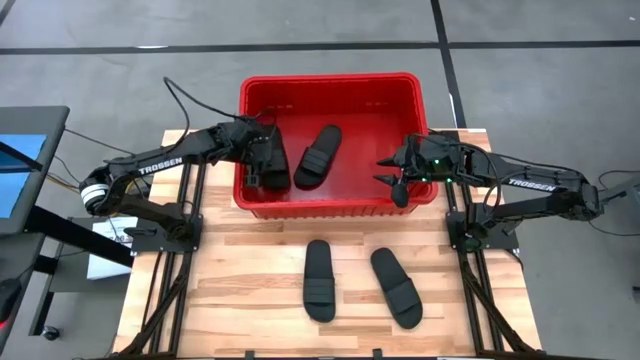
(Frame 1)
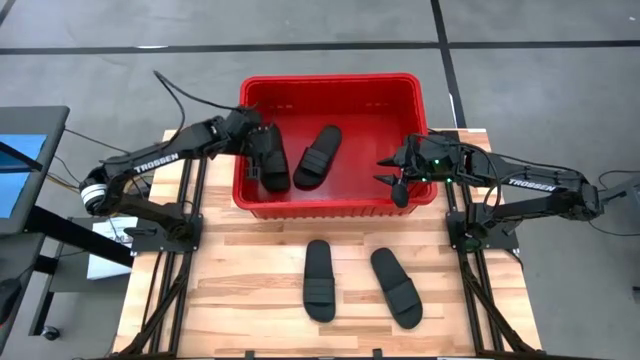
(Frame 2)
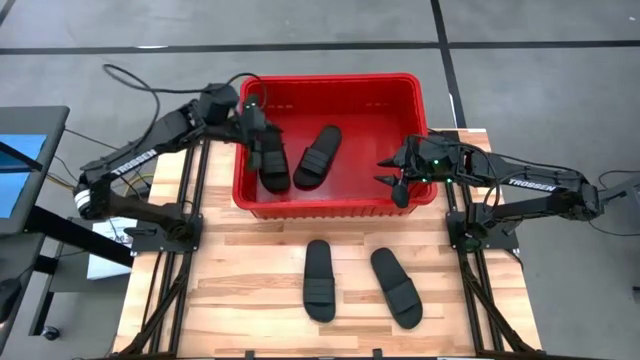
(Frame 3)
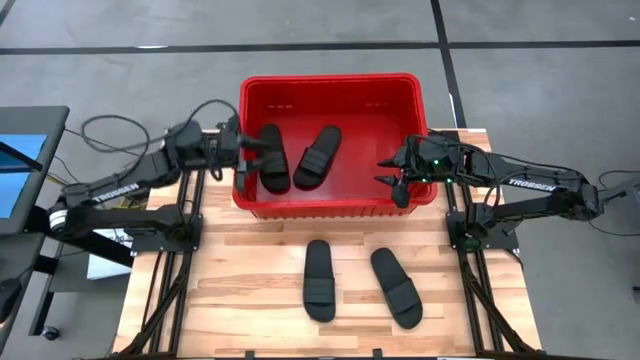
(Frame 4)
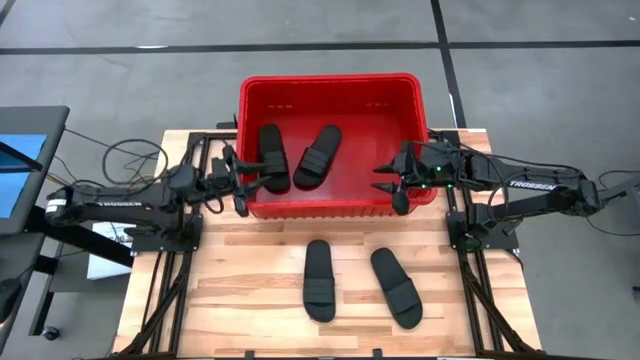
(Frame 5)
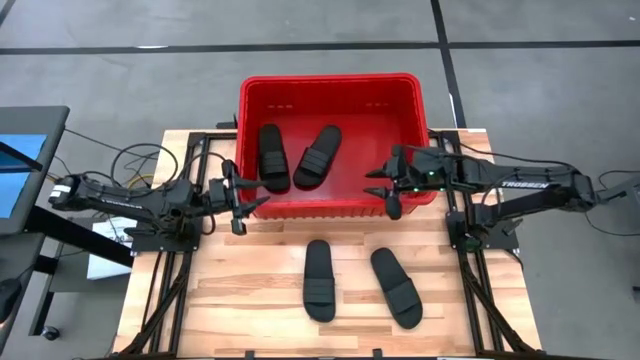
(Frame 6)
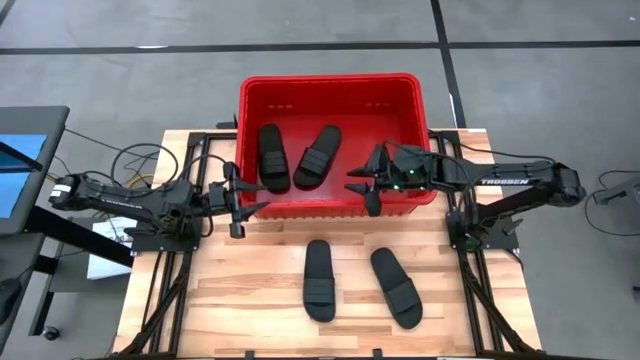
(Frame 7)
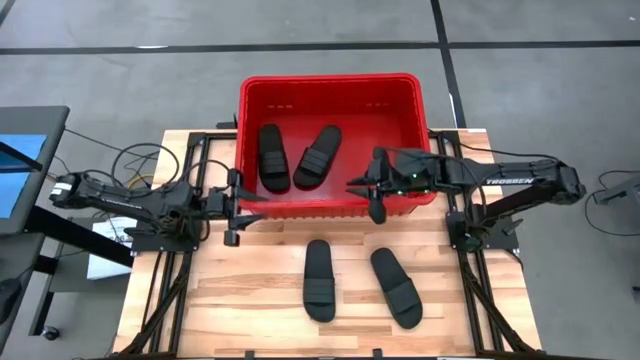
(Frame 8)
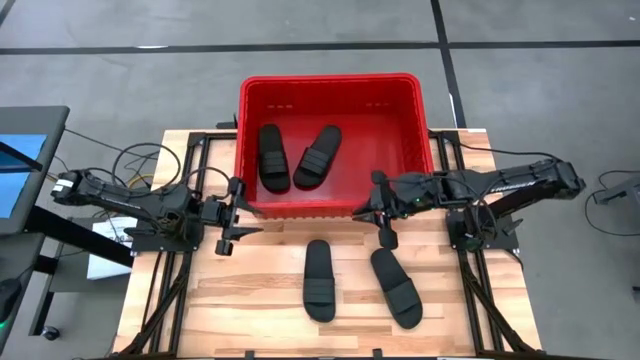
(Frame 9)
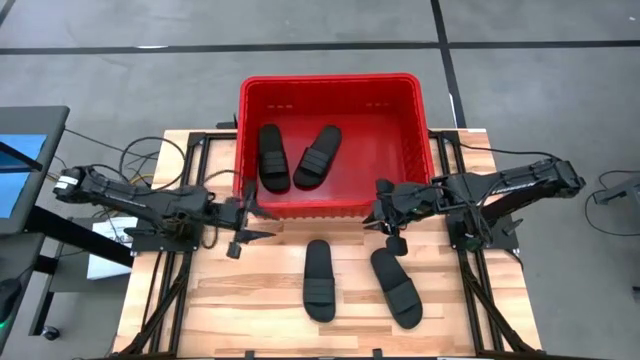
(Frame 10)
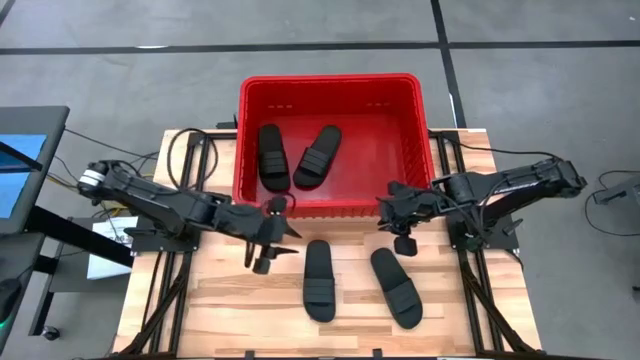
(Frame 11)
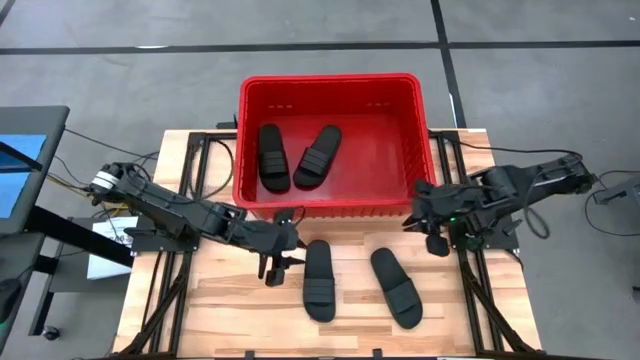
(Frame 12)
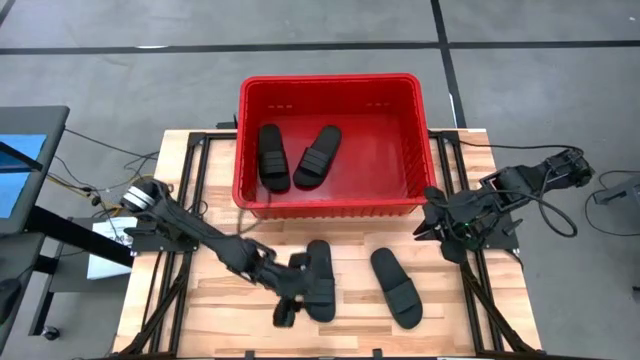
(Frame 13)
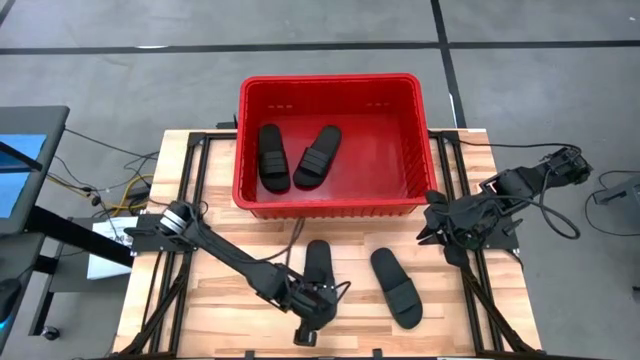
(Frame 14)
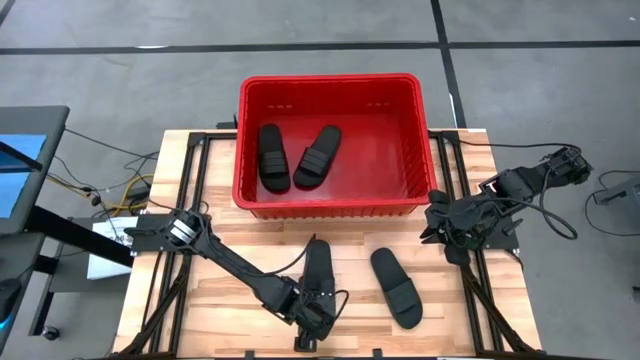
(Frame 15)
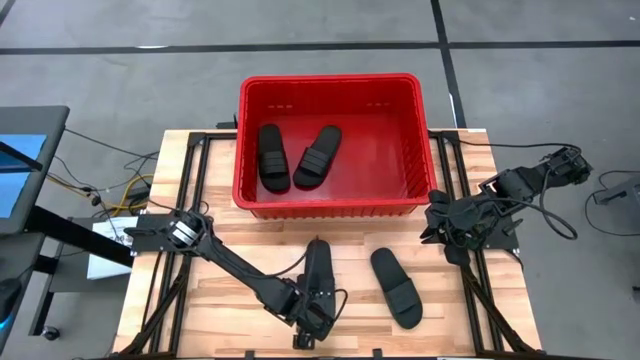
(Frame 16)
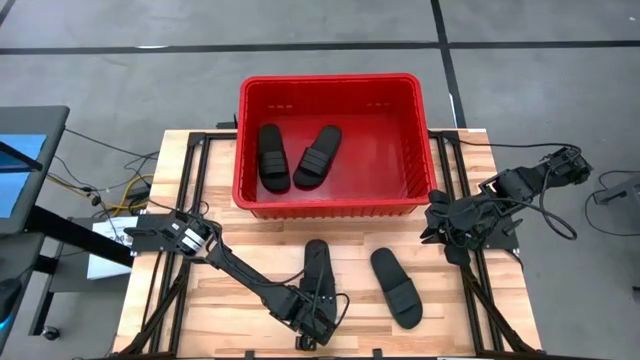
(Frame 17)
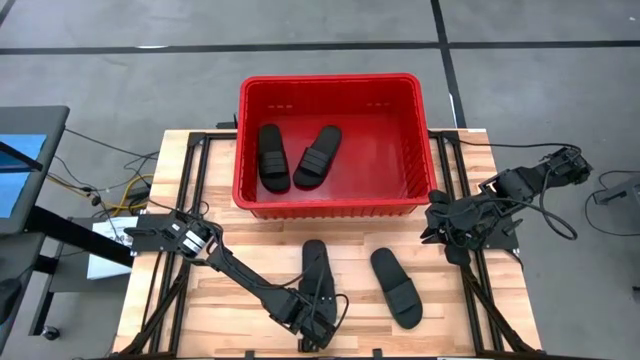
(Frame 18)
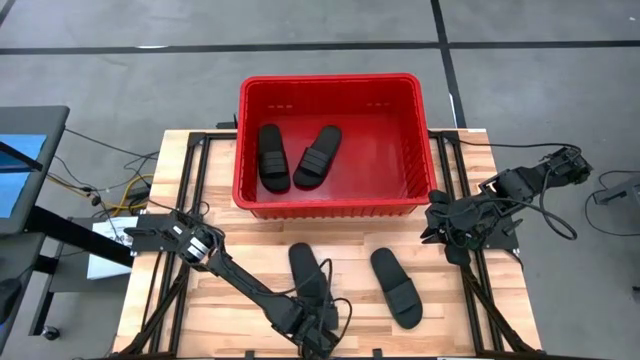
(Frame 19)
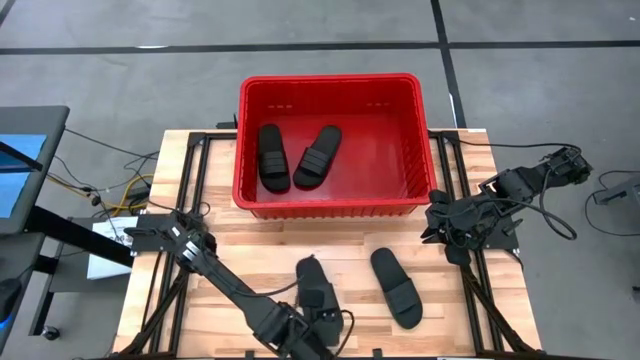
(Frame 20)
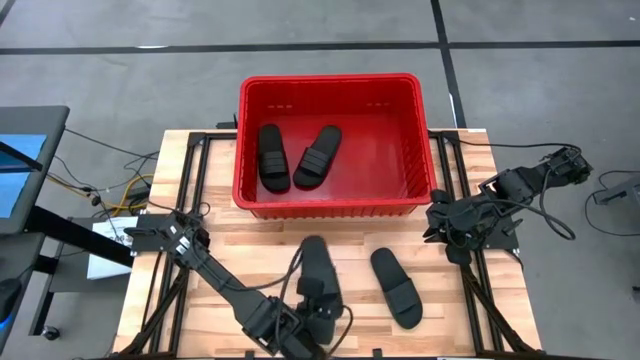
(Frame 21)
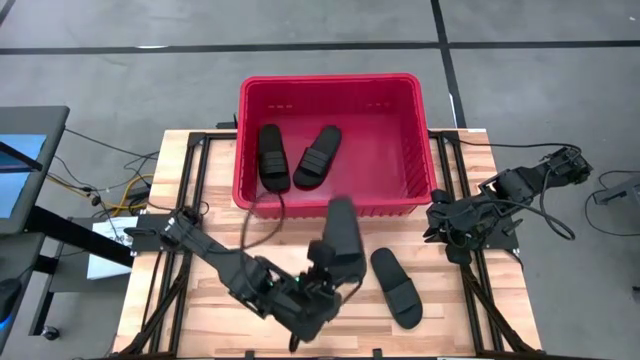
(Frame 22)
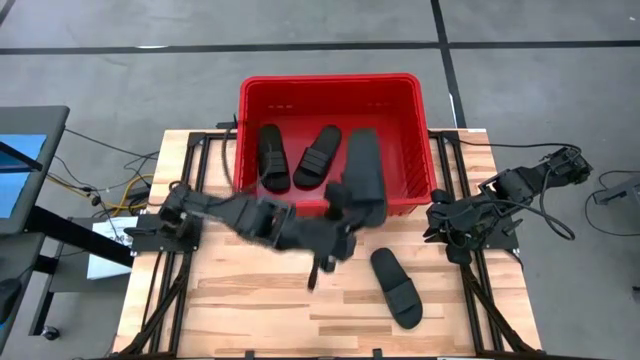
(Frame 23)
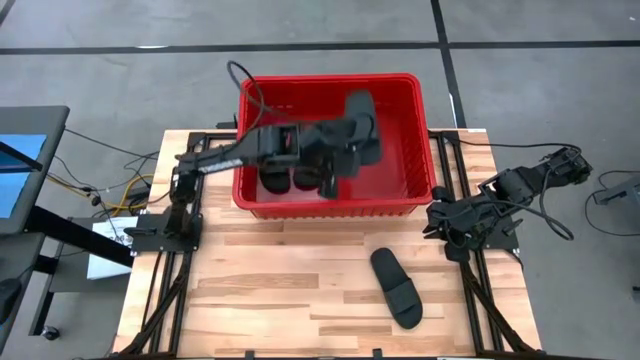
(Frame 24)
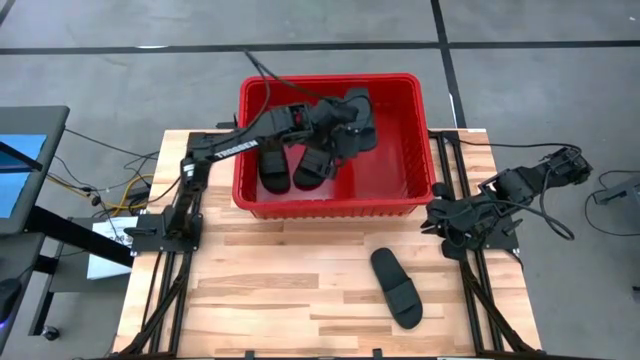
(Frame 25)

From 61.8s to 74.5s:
Task: Pick and place slides into bin
Put the black slipper into the red bin

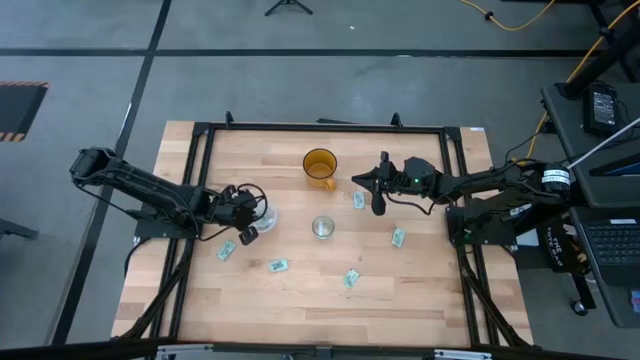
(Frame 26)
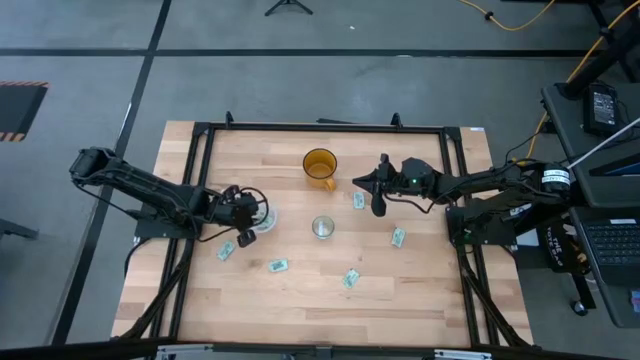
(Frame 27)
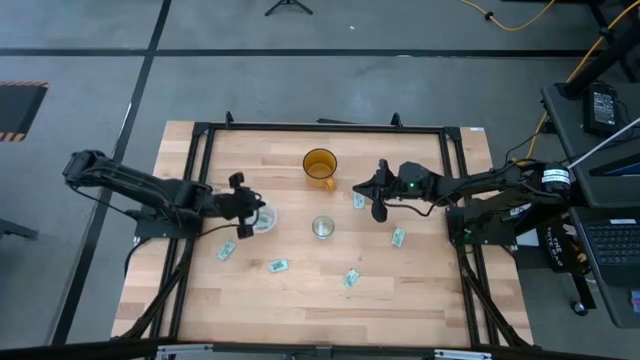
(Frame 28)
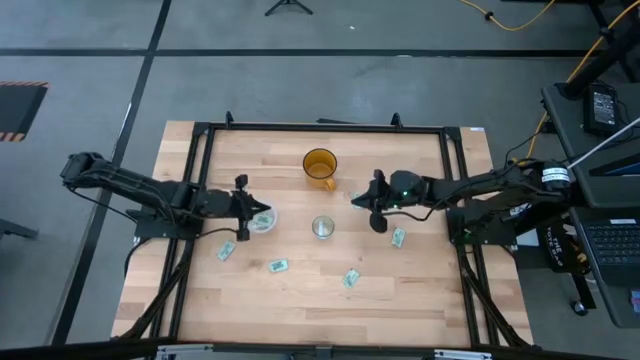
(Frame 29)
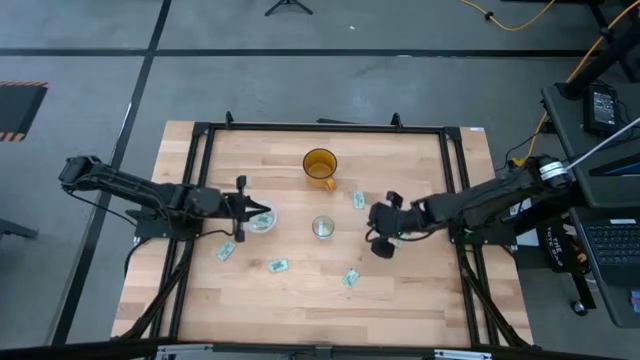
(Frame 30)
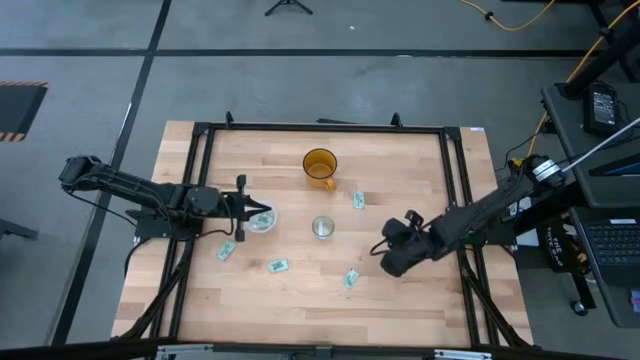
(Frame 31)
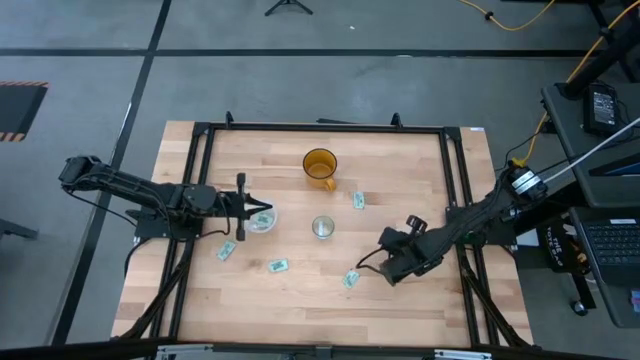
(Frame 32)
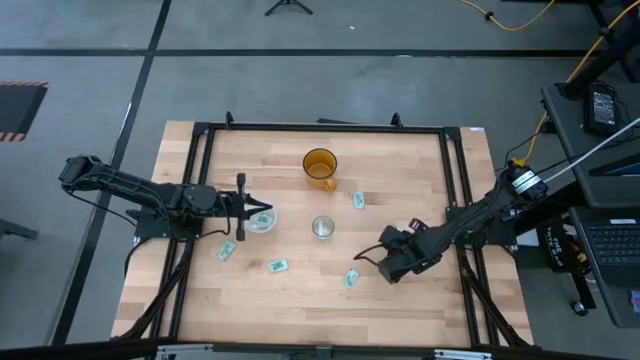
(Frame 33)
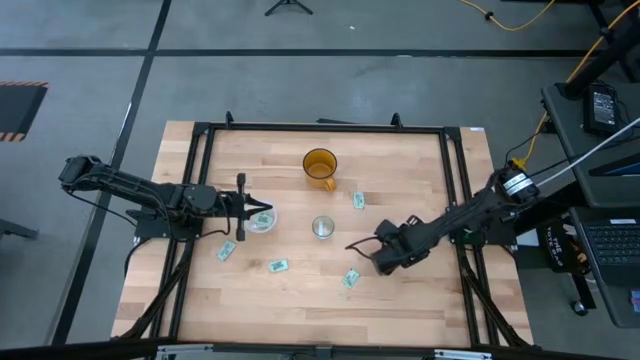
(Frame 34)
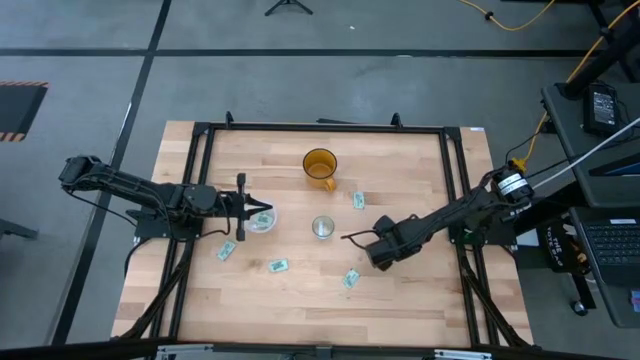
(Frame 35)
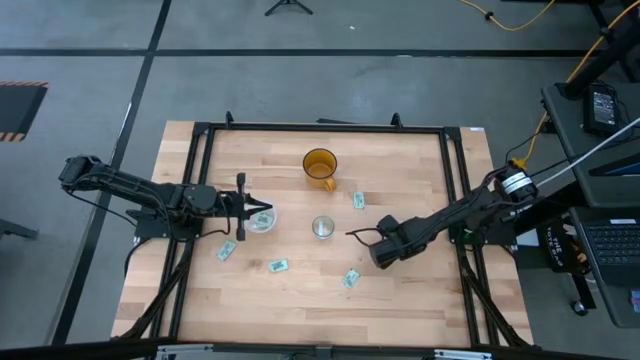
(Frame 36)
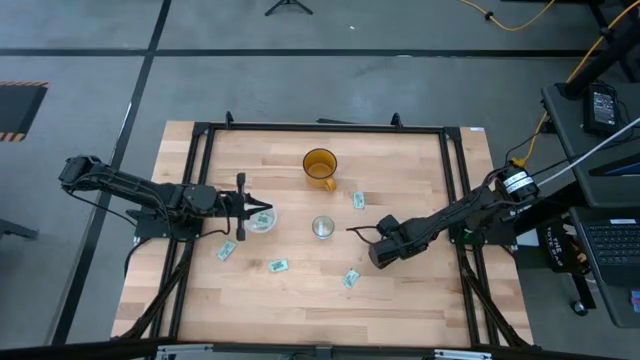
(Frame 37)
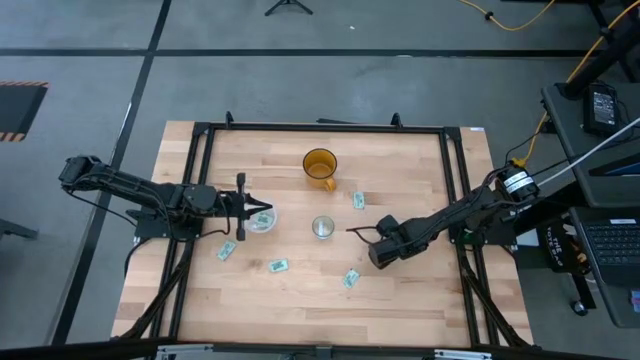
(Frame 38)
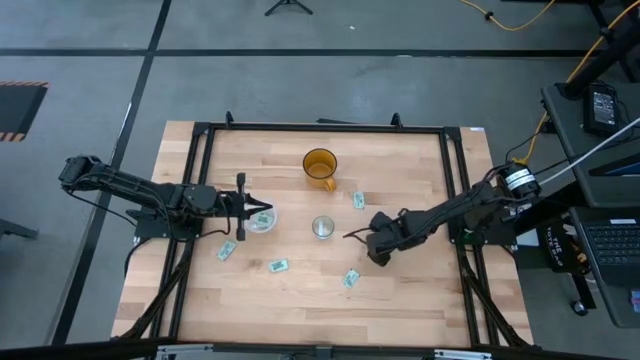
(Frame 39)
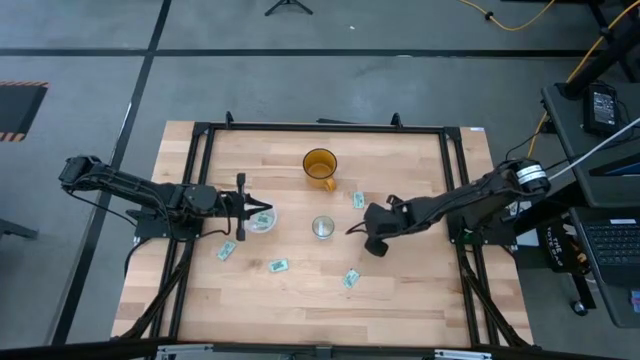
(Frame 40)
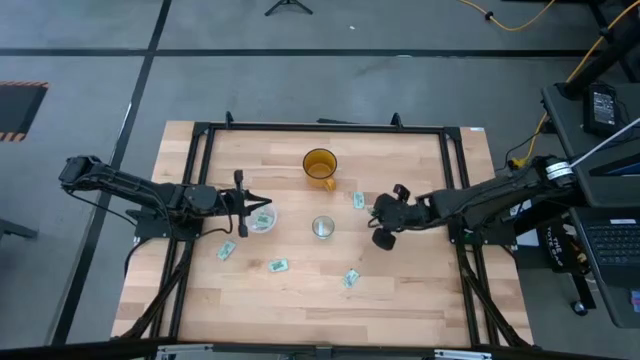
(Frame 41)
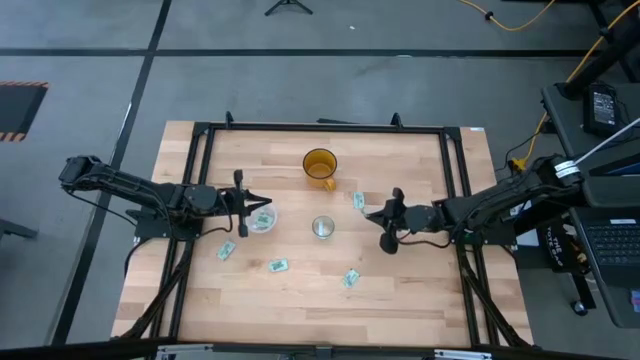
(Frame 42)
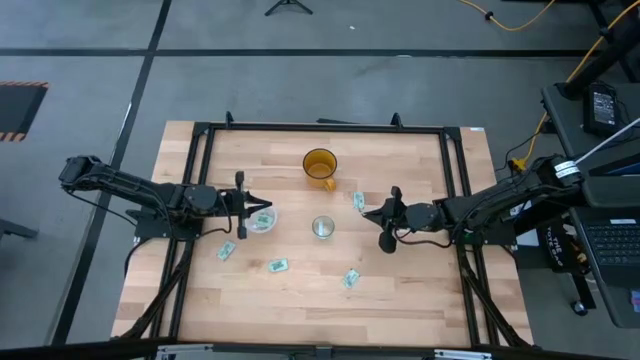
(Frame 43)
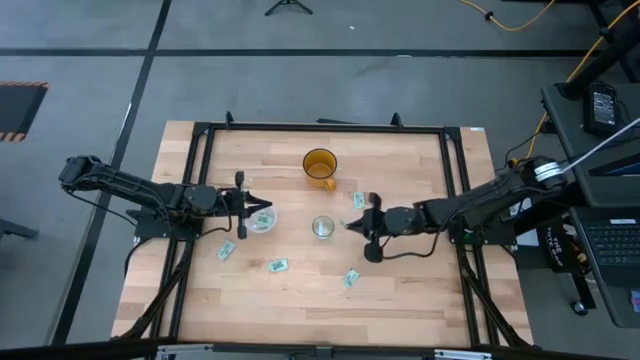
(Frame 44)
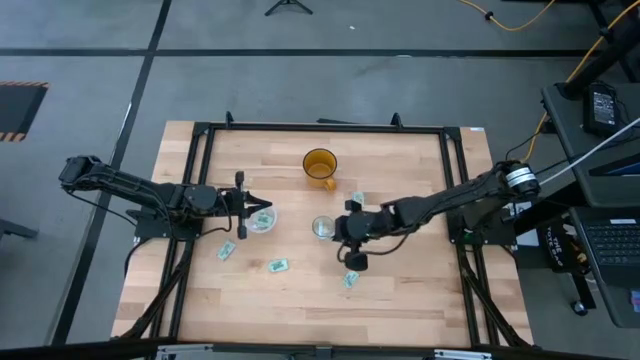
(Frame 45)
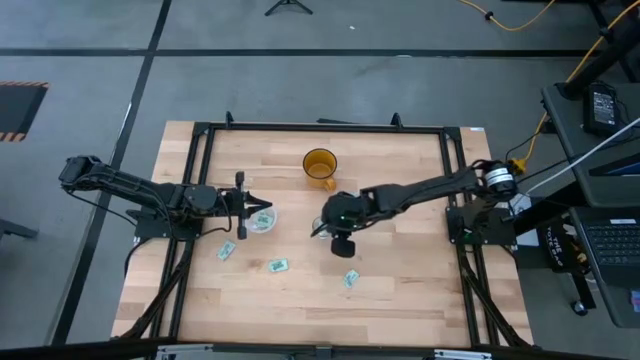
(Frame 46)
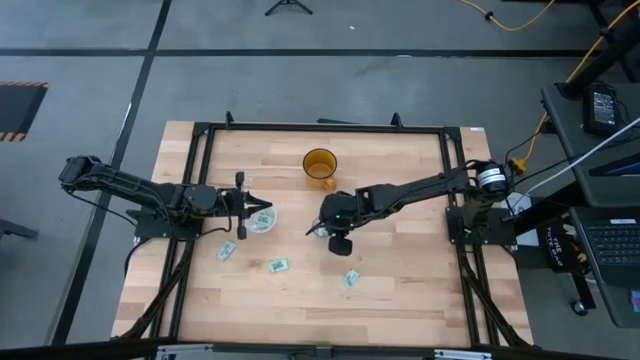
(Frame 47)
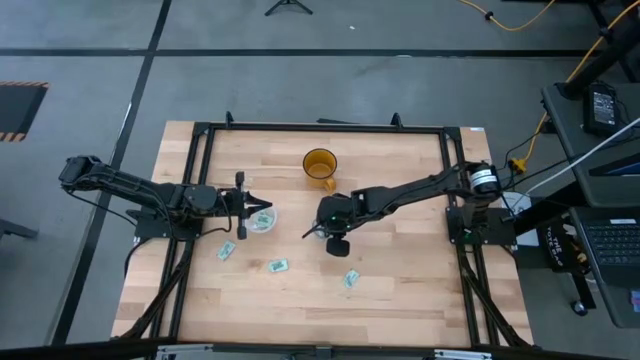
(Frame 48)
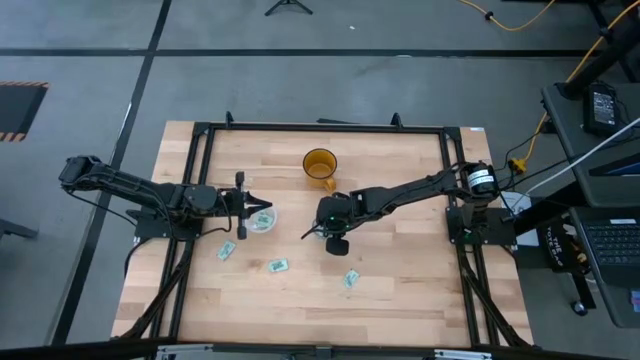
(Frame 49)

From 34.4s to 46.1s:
Task: Pick and place Stevia / Truvia into bins
Put the stevia packet into the glass tupperware
